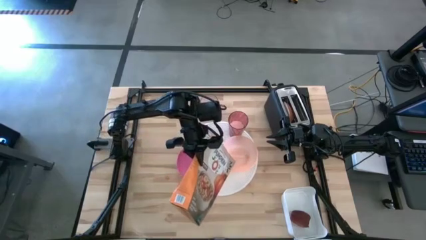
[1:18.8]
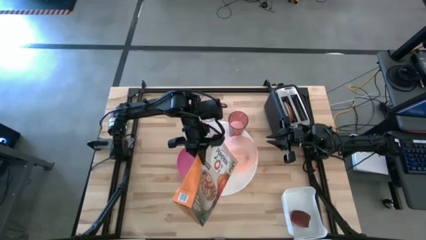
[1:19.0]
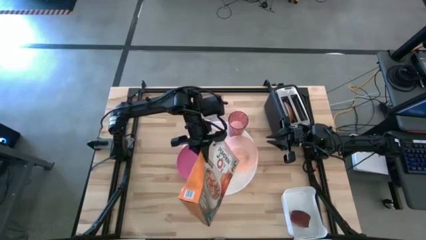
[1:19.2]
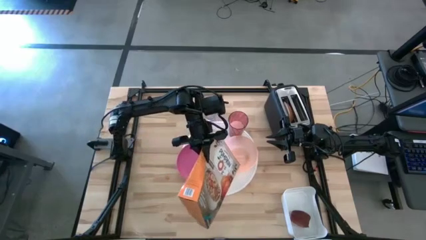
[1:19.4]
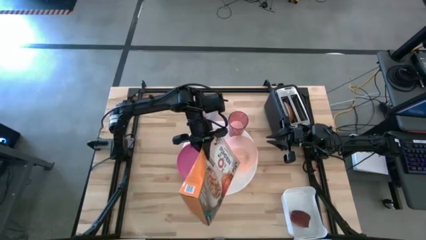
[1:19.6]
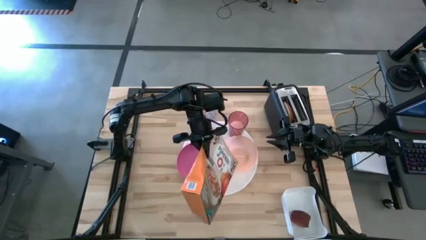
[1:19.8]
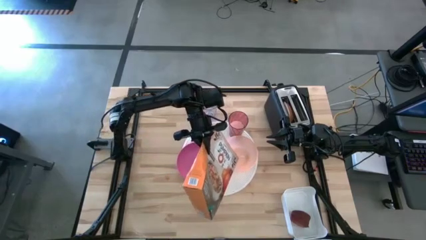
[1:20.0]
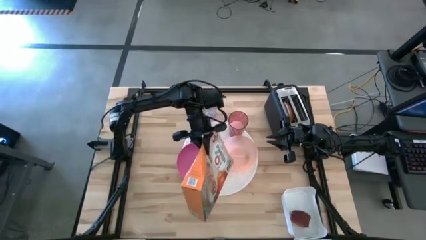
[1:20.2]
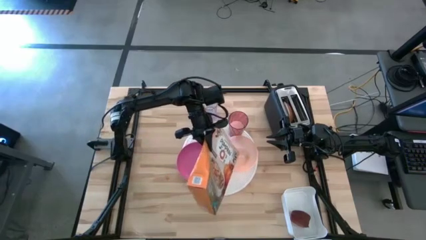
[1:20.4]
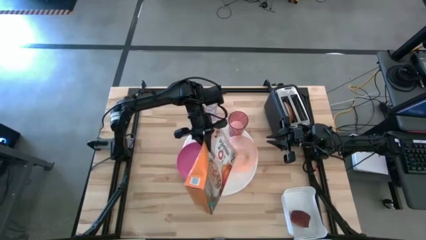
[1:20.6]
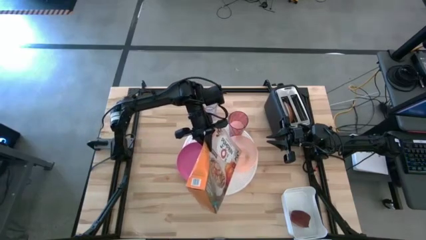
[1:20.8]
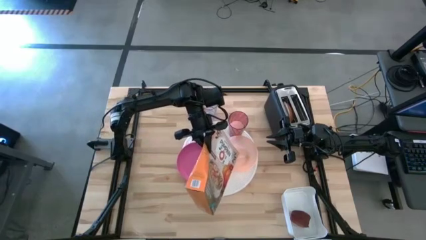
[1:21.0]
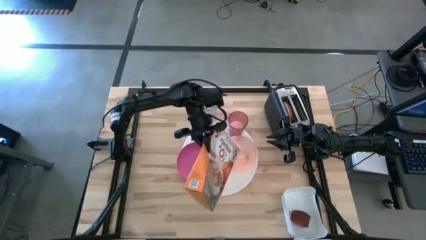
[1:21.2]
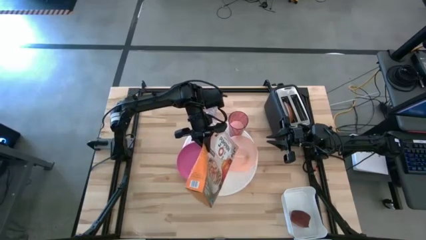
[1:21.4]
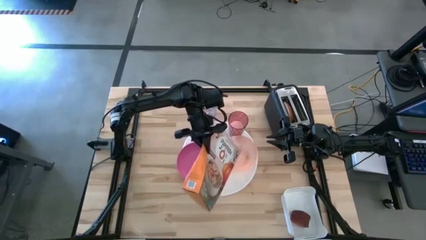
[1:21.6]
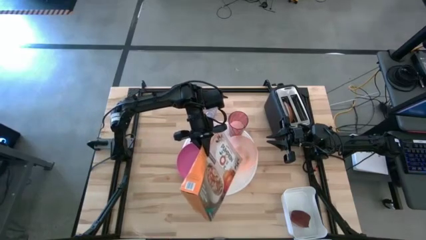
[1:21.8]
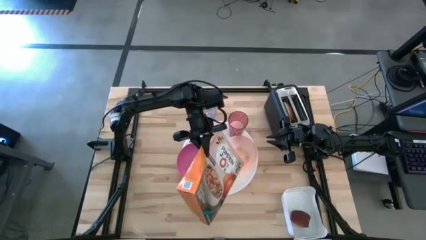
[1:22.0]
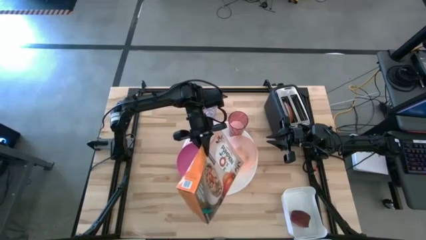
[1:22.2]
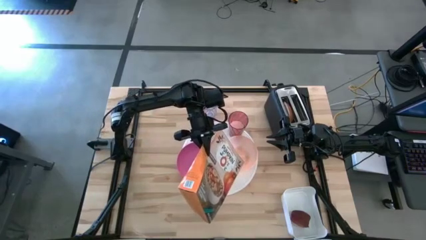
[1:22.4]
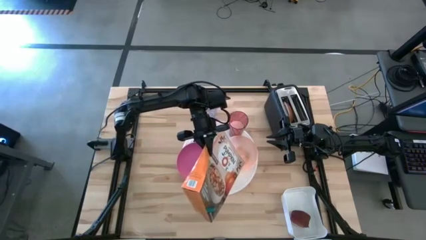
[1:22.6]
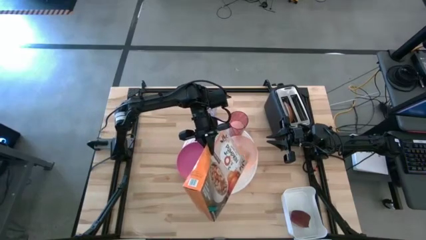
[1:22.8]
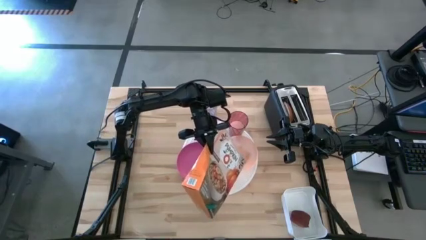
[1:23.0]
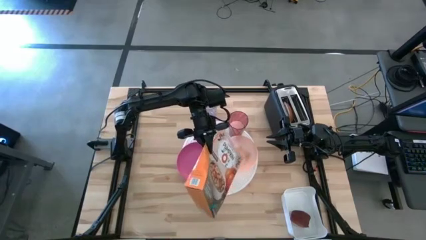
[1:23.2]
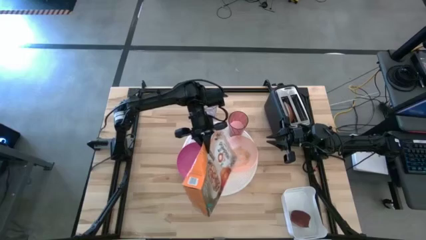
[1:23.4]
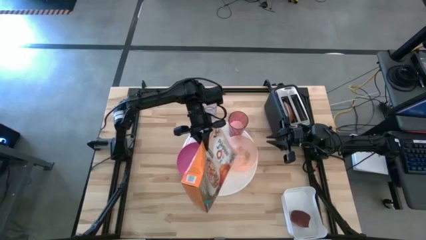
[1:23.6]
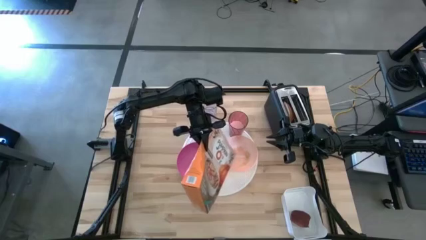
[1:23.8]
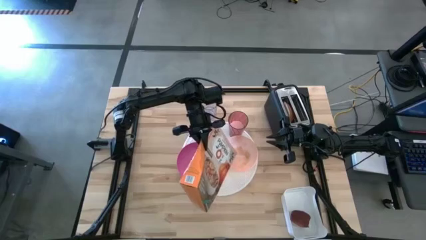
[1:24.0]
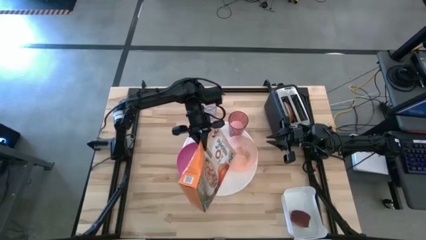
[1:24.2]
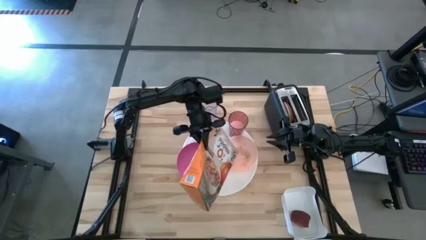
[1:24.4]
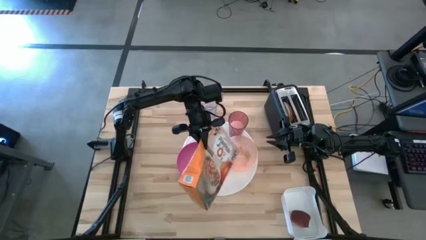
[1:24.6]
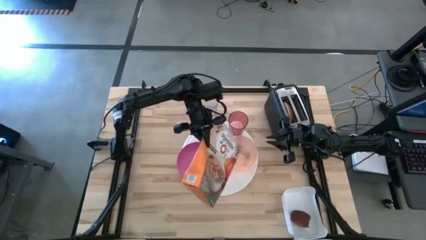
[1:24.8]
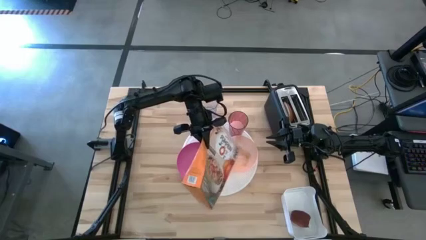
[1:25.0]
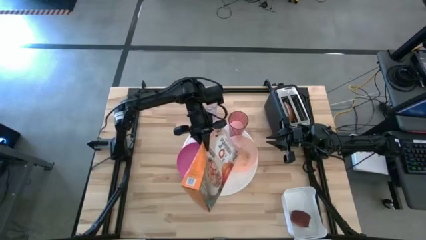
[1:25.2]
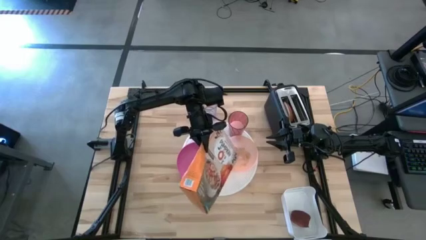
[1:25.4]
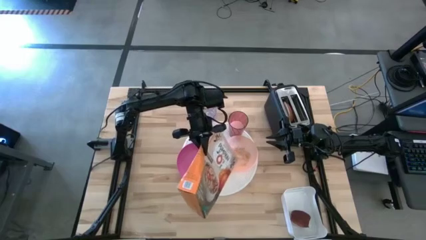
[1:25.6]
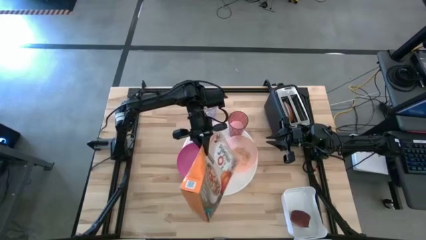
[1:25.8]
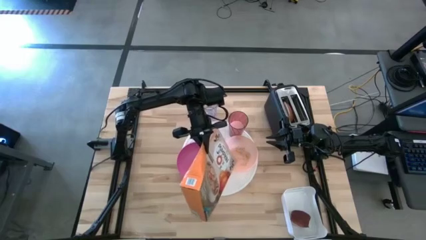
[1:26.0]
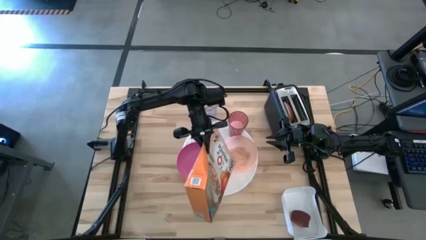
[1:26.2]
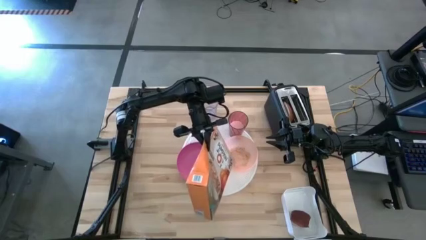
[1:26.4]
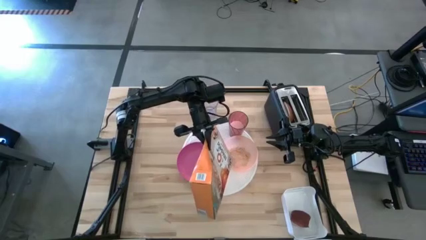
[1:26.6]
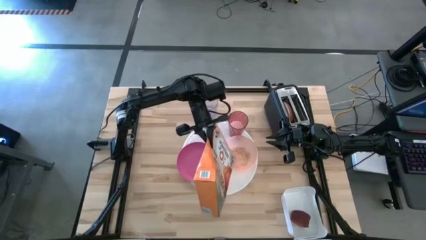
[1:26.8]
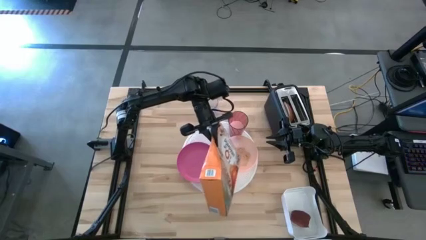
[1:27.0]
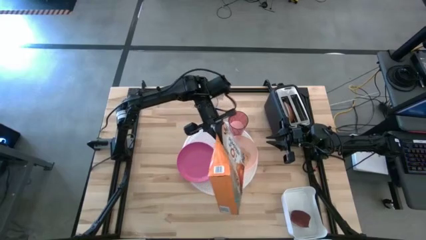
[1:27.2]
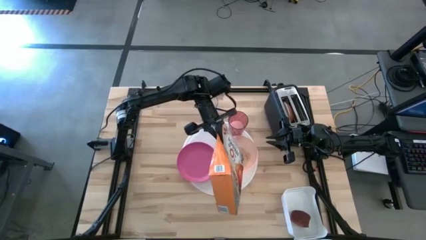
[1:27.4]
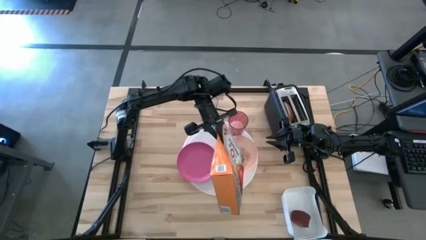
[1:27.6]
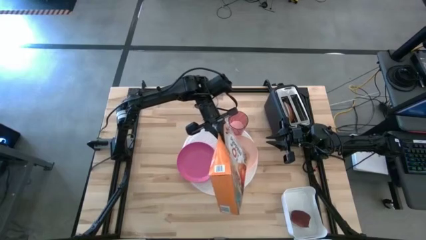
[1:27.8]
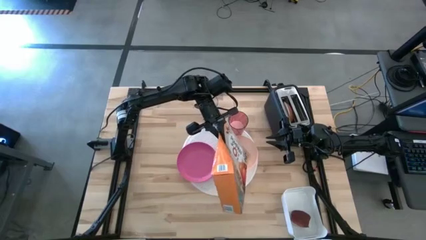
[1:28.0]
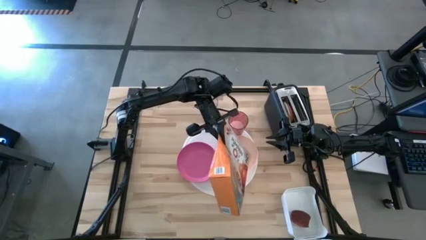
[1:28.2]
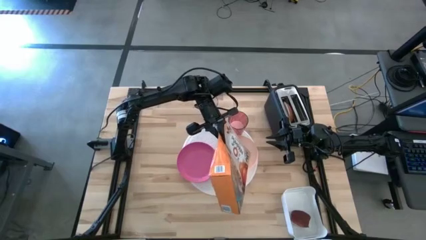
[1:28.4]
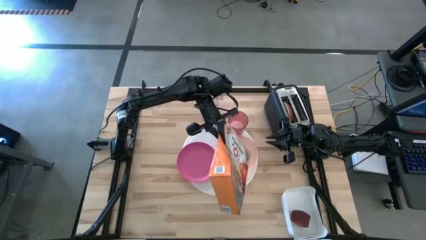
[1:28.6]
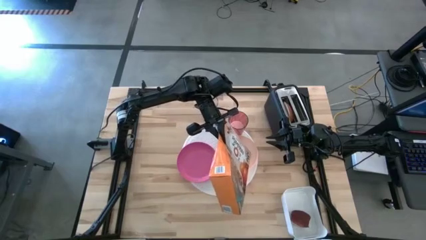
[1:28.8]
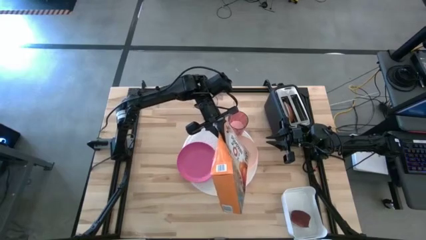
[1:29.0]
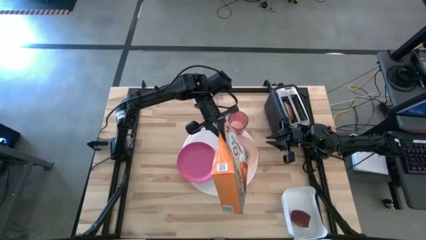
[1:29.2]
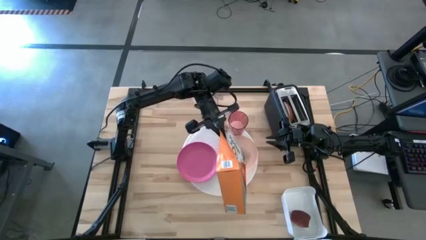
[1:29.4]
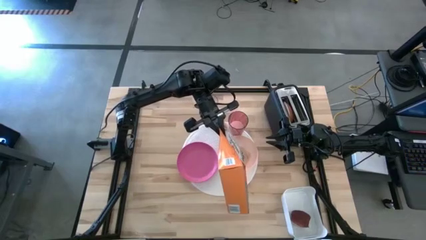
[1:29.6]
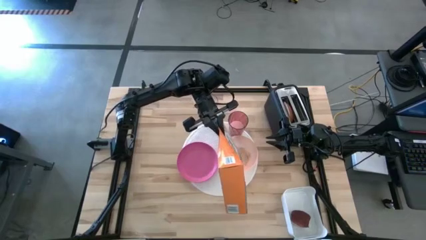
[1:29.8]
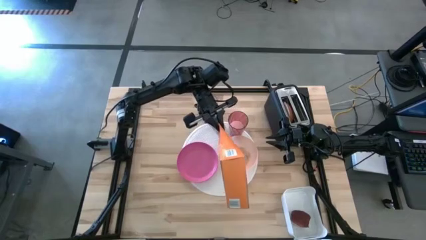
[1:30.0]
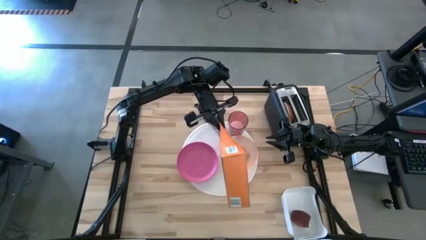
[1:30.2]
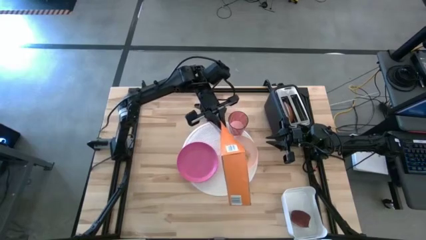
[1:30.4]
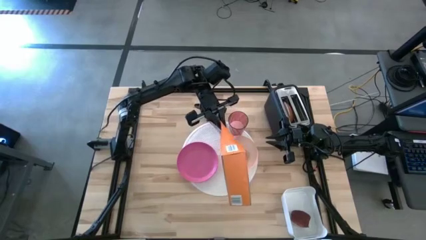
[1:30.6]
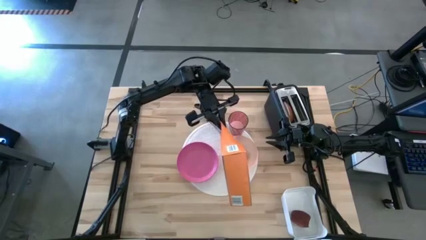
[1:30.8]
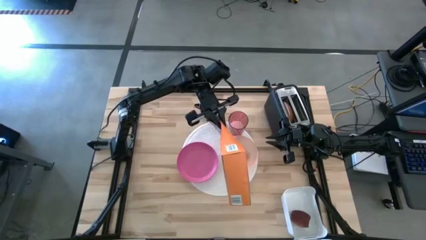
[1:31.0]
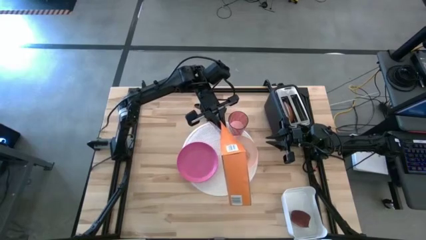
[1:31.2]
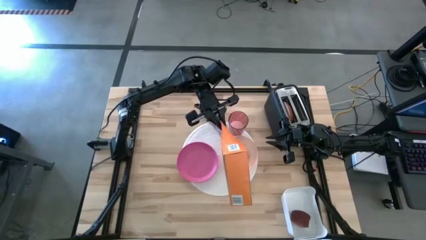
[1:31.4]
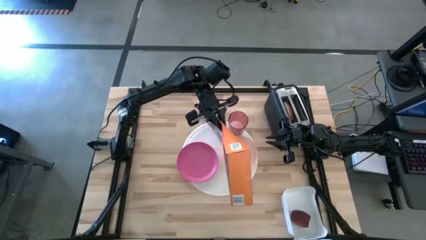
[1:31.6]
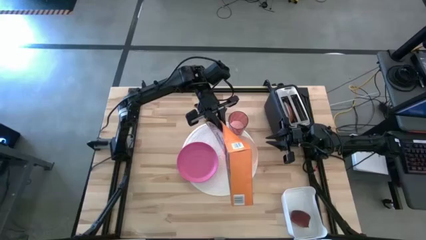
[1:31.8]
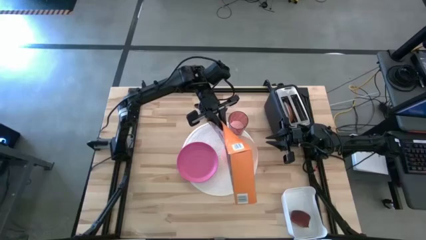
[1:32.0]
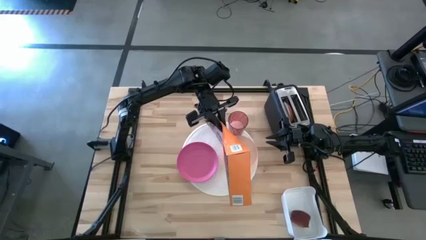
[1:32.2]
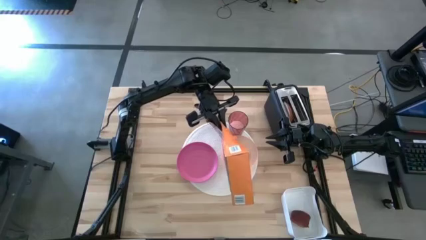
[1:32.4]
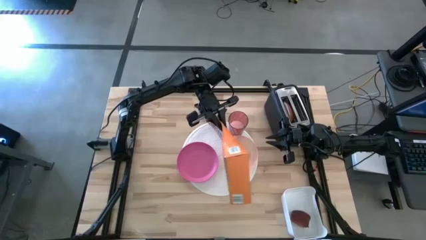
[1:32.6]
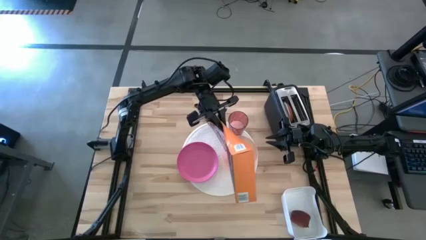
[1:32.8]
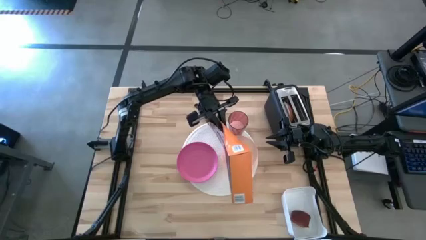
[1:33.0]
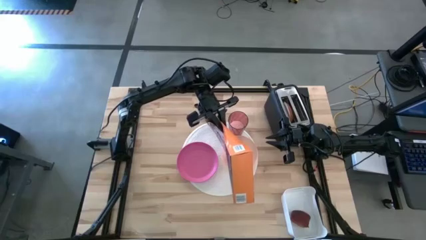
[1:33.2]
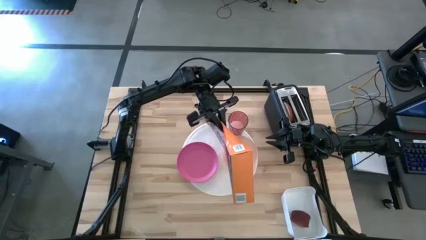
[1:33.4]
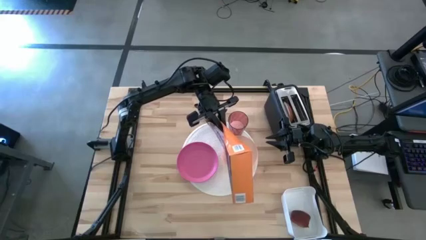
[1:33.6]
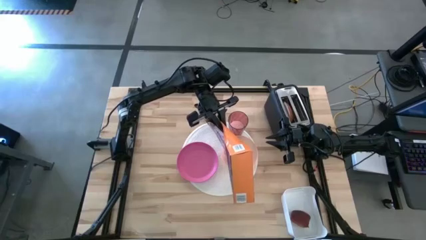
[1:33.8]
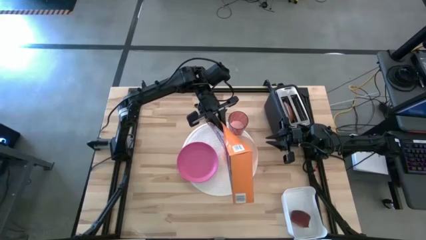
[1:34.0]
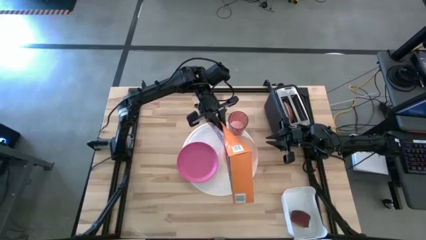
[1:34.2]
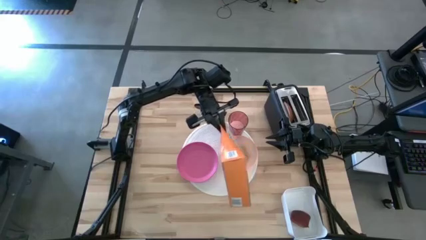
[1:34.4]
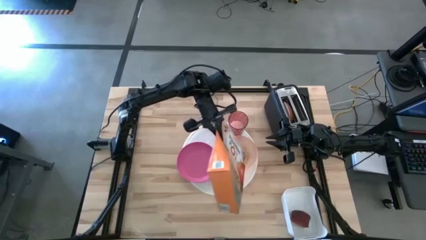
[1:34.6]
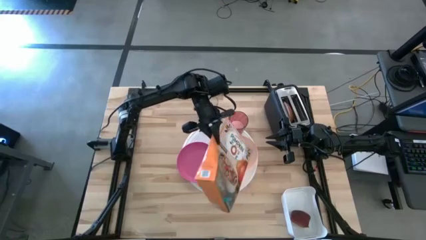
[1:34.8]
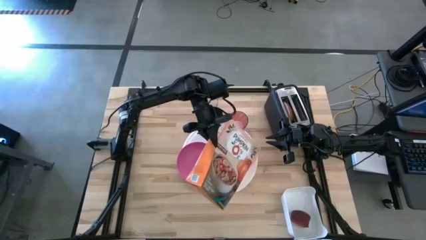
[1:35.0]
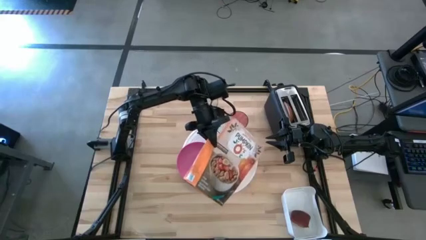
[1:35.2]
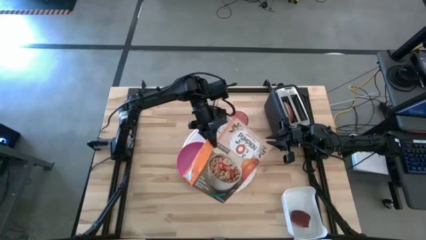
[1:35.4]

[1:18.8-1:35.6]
Task: Arrange a breakfast setting
Pour the cereal from the orange cereal box into the orange bowl
